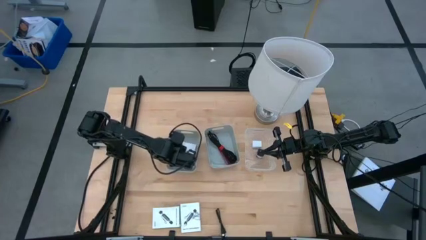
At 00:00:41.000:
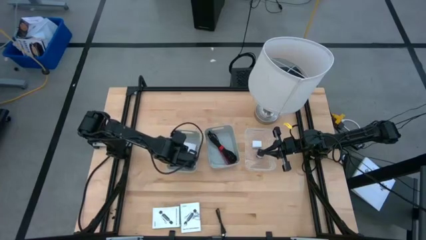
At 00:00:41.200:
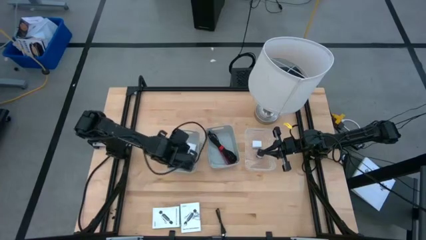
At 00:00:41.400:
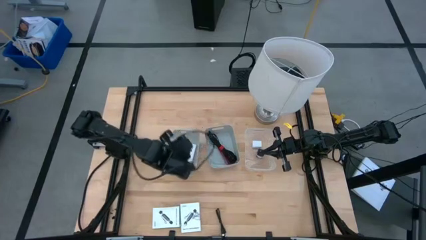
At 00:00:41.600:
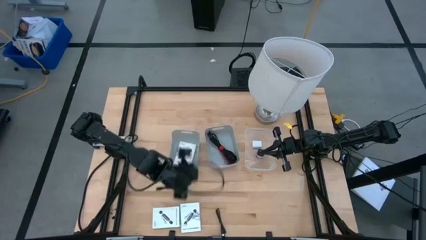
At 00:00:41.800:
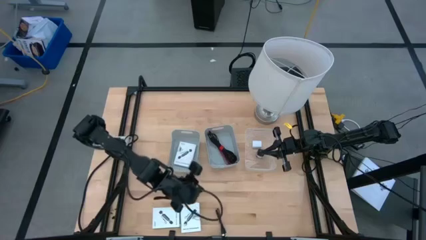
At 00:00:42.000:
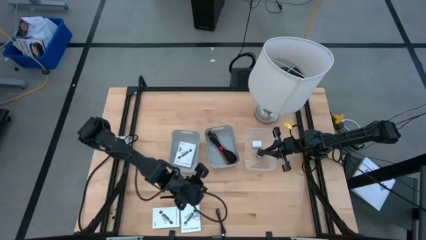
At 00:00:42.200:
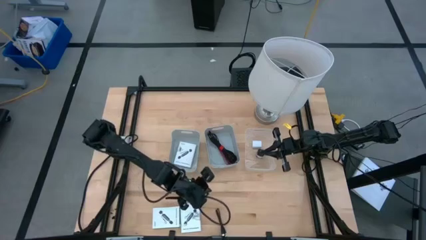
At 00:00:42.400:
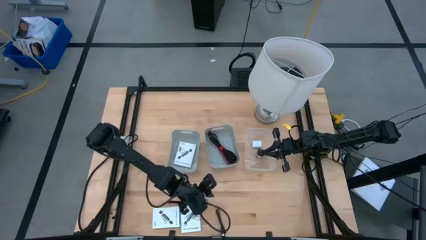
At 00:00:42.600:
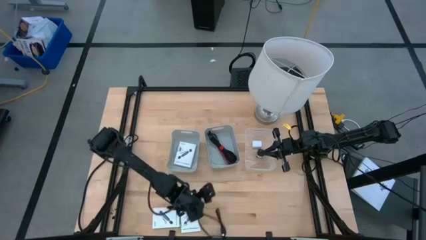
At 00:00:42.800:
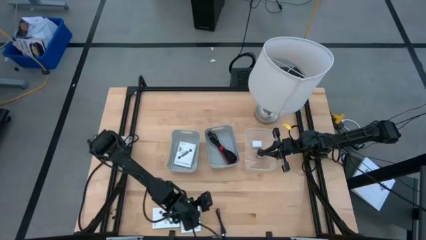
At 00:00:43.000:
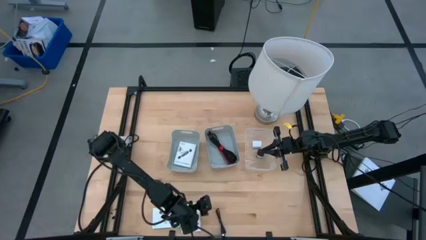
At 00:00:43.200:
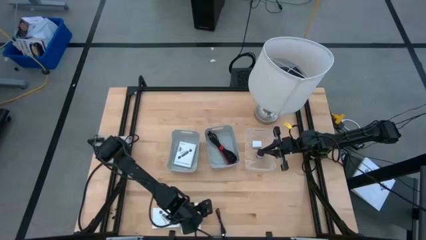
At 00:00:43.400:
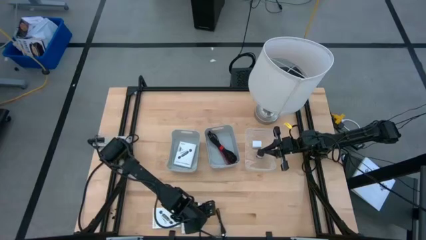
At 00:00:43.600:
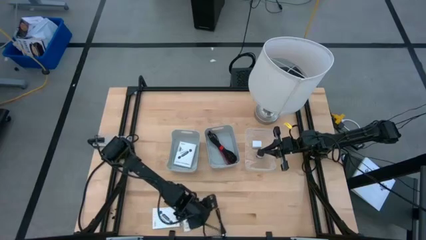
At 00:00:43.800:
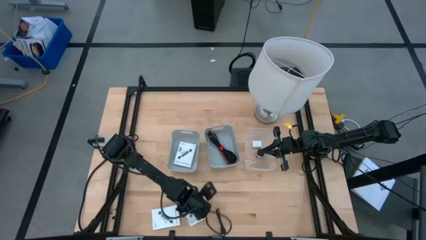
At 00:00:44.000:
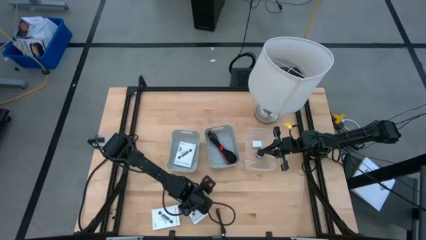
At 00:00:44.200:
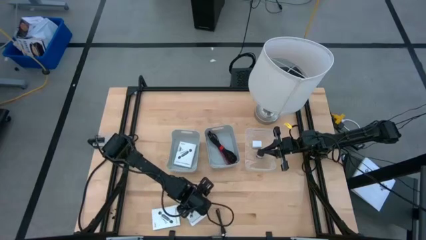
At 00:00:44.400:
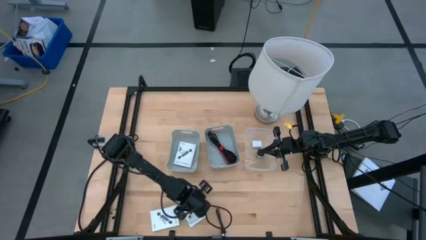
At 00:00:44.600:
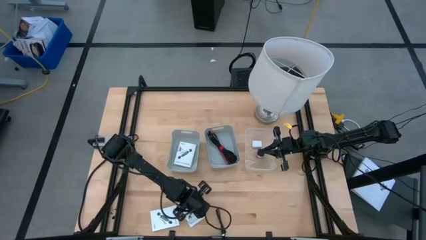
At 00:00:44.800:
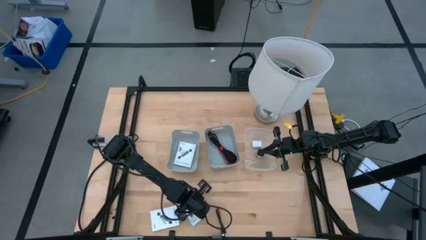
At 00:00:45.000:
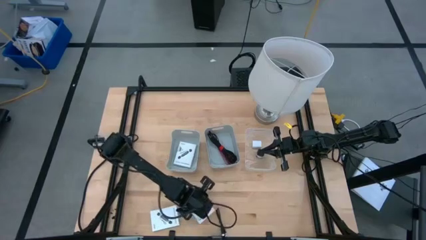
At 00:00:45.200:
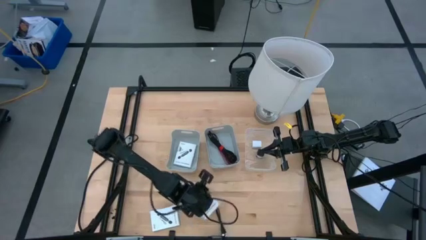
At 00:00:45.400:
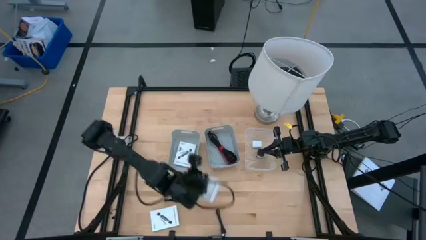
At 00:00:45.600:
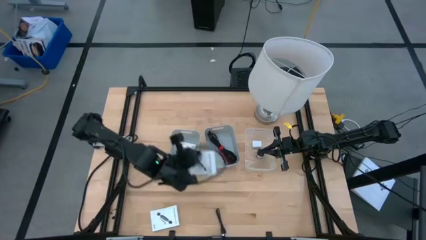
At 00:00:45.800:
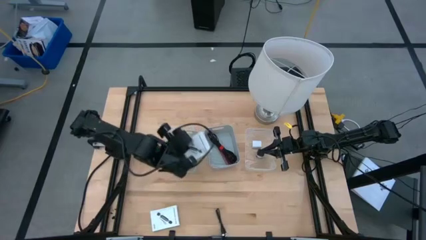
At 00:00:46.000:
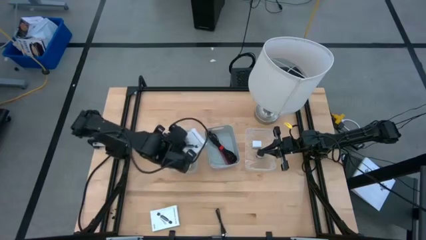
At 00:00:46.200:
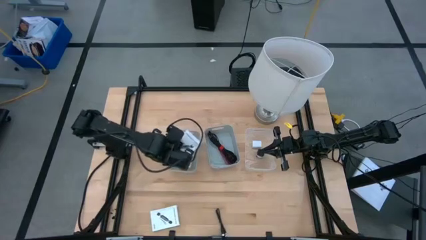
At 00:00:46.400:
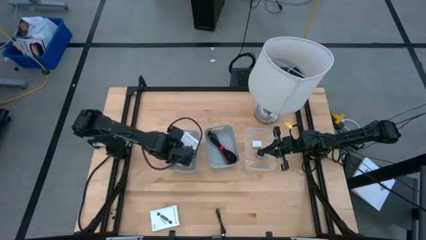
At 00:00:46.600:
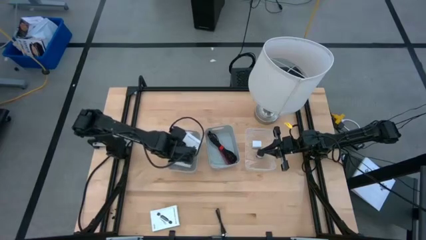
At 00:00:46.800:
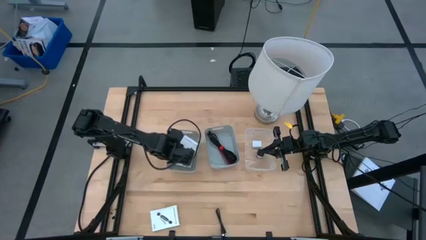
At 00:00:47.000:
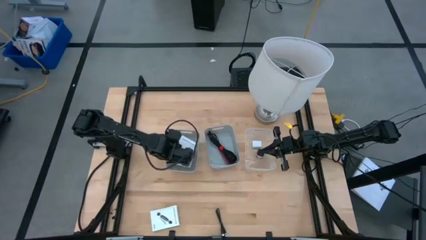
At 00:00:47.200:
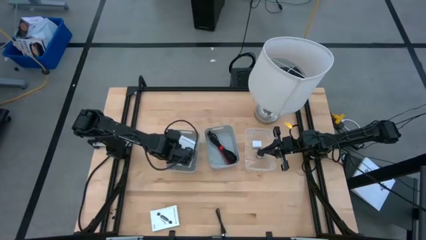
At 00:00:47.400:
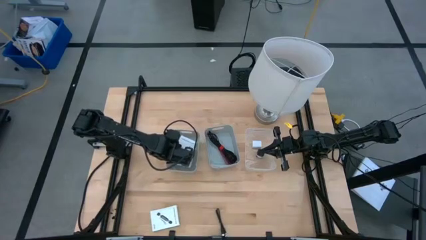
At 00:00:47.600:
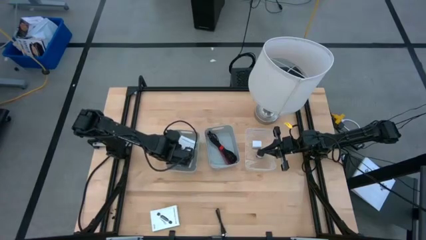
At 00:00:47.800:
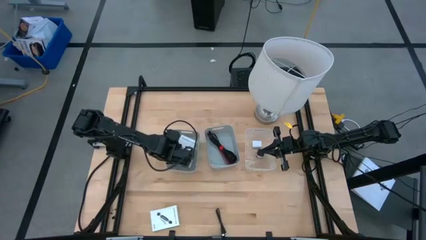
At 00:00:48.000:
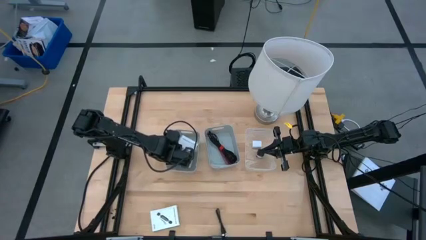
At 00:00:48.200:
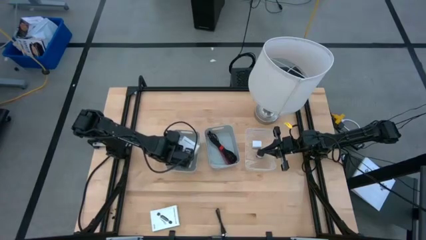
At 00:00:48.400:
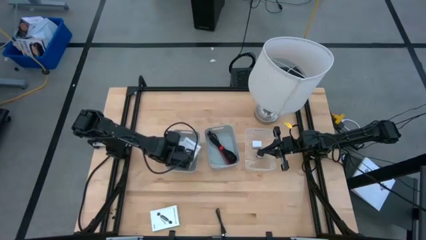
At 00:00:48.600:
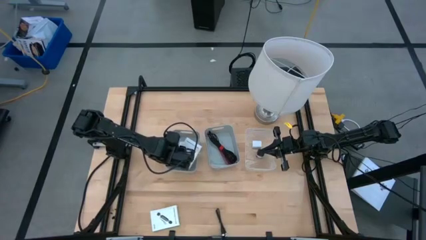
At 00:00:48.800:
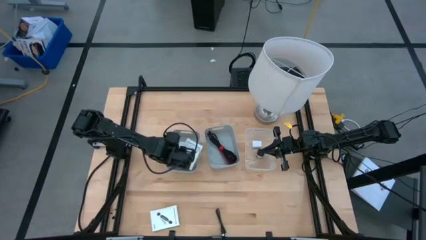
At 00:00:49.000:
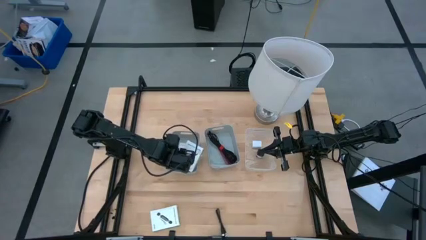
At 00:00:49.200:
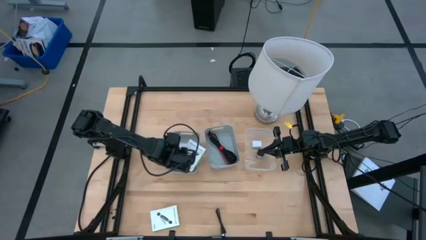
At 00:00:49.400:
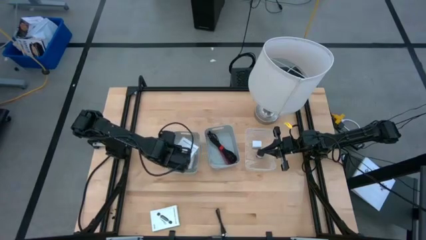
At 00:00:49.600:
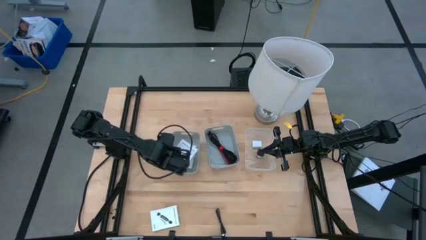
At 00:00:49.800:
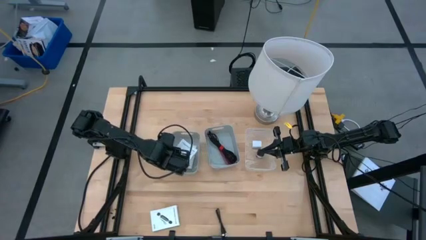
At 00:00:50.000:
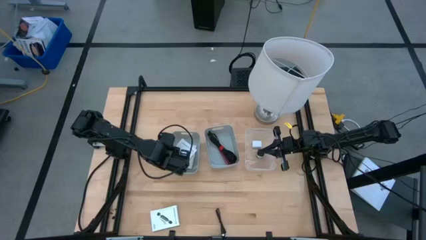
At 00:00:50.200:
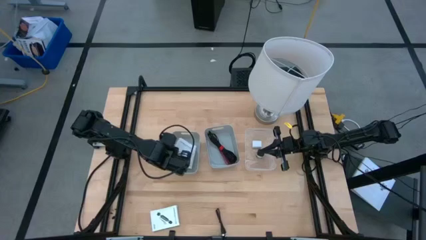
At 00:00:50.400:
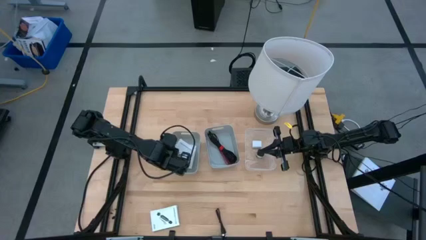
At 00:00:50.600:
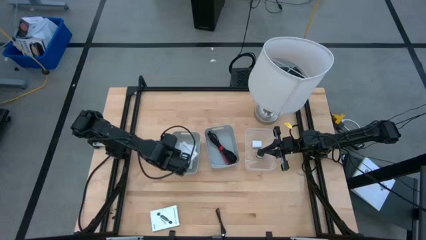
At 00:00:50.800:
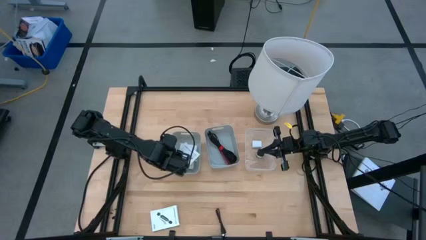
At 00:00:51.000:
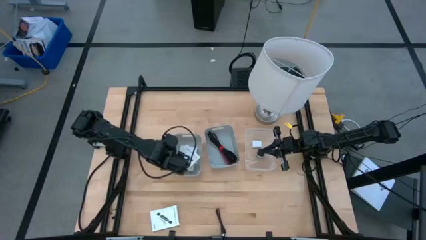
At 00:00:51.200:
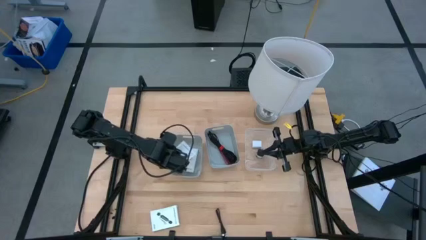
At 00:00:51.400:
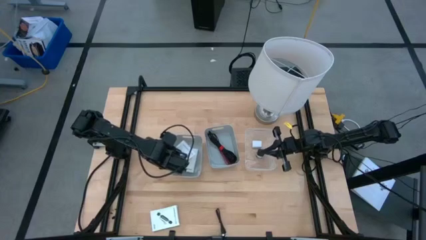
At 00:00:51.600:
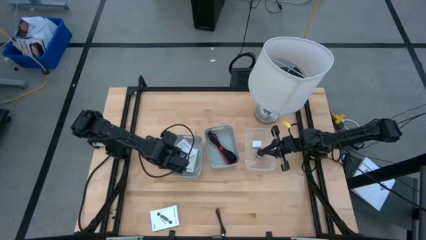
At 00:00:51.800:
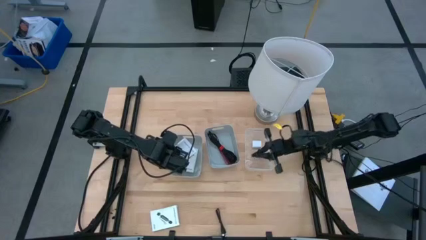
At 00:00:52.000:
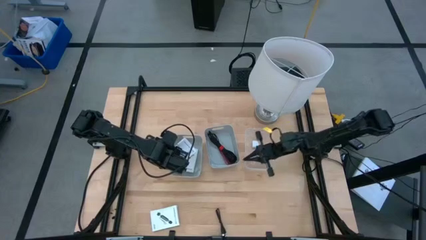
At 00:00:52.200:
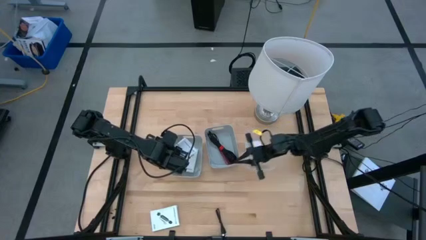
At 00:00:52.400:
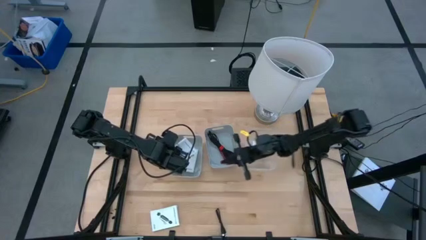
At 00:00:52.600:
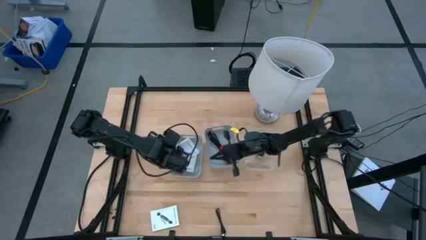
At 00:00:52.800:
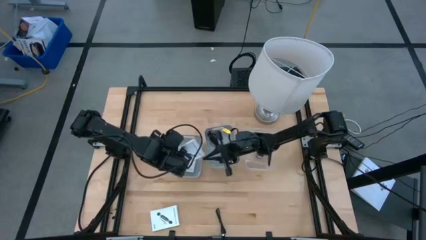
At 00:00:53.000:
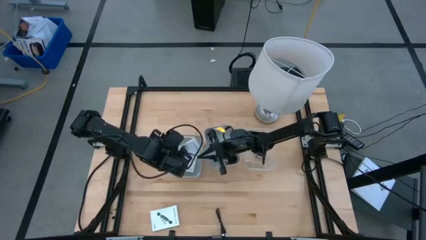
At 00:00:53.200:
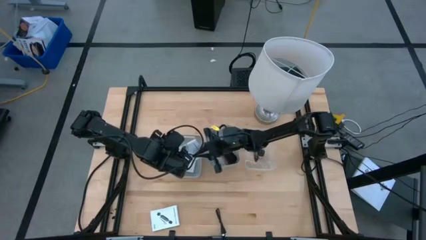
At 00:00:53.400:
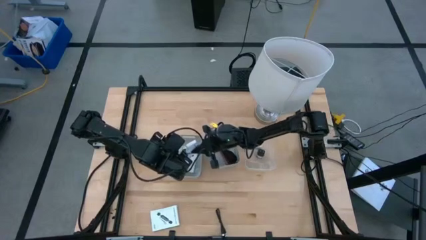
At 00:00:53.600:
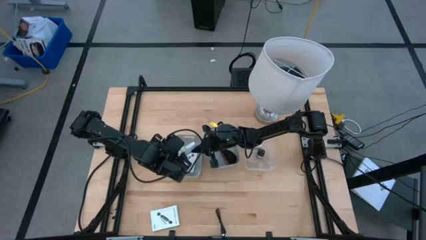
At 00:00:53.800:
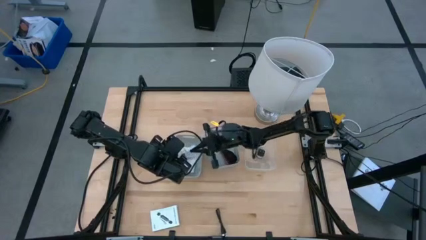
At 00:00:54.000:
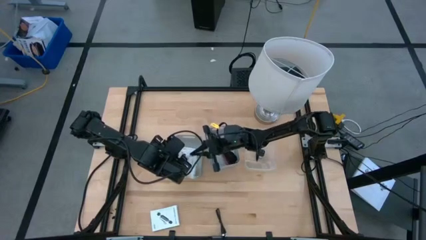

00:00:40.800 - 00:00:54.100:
Task: Pick and place items into bin
Put the right card reader box into the left gray bin

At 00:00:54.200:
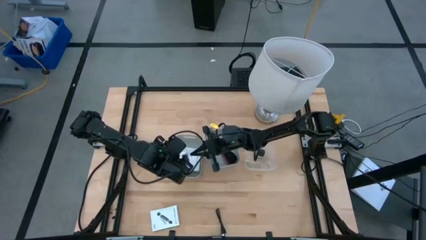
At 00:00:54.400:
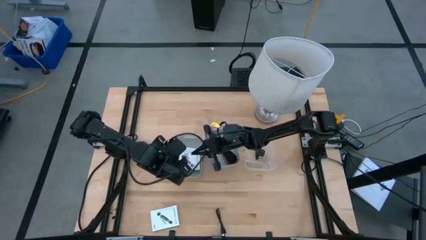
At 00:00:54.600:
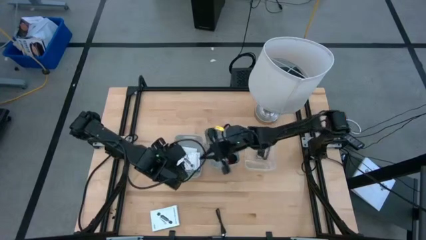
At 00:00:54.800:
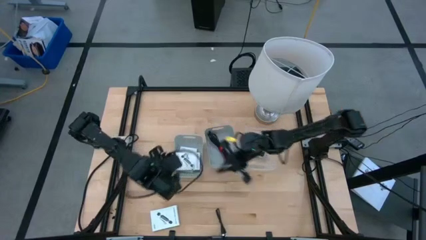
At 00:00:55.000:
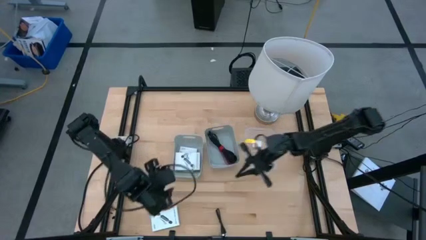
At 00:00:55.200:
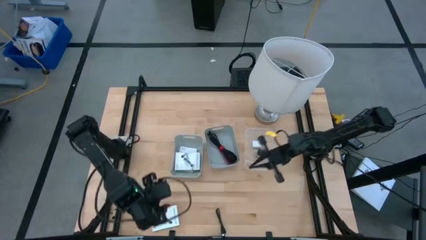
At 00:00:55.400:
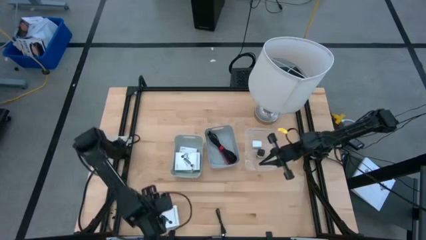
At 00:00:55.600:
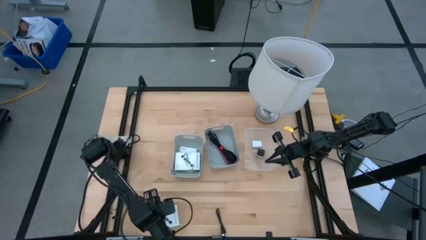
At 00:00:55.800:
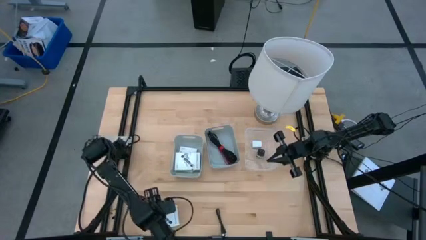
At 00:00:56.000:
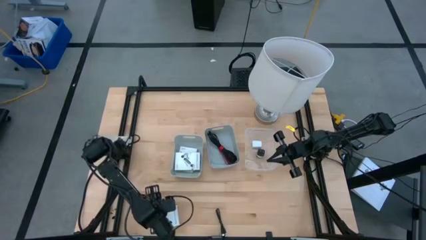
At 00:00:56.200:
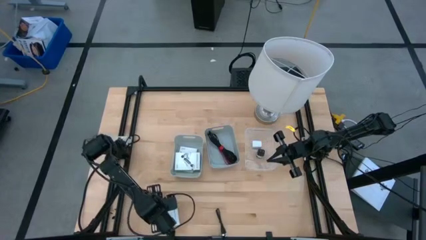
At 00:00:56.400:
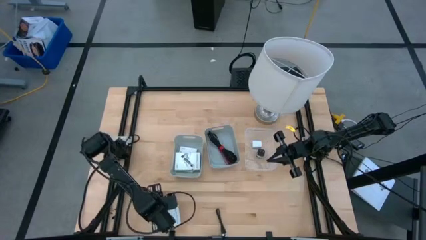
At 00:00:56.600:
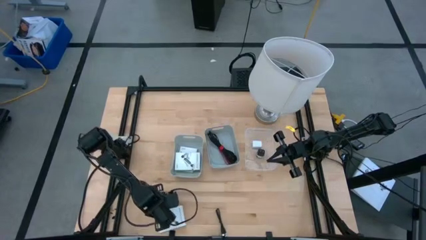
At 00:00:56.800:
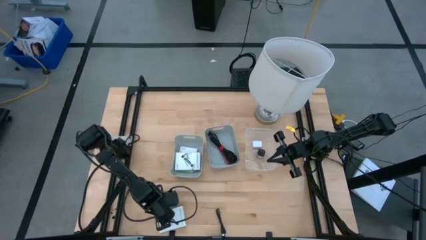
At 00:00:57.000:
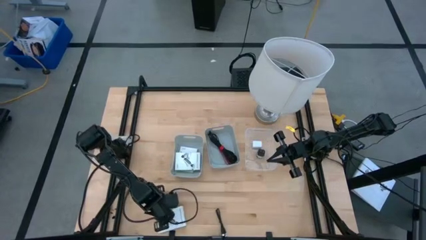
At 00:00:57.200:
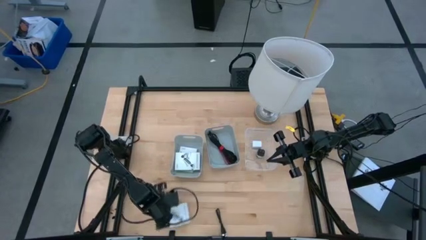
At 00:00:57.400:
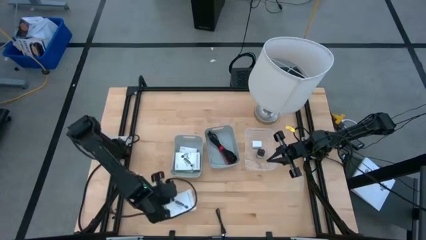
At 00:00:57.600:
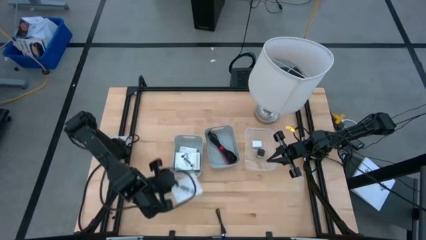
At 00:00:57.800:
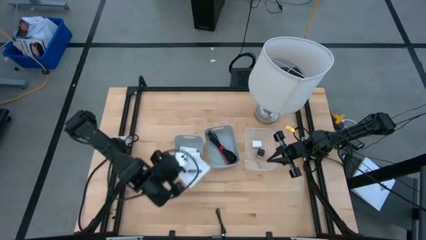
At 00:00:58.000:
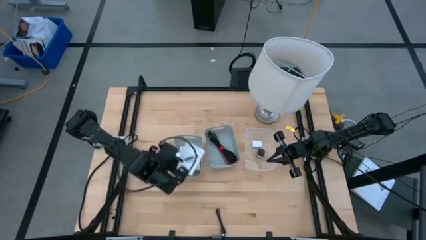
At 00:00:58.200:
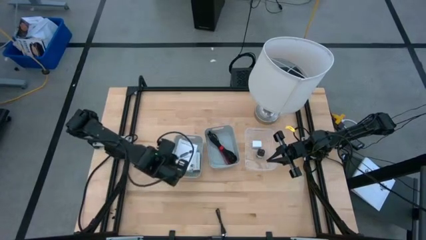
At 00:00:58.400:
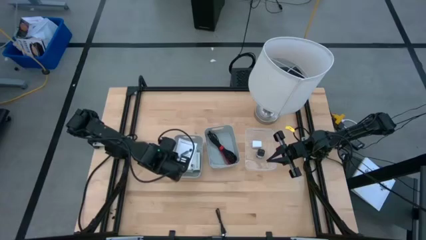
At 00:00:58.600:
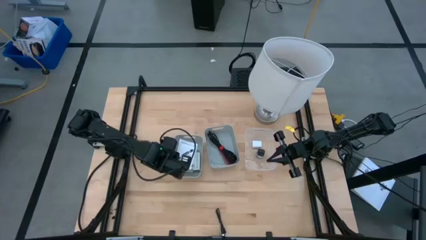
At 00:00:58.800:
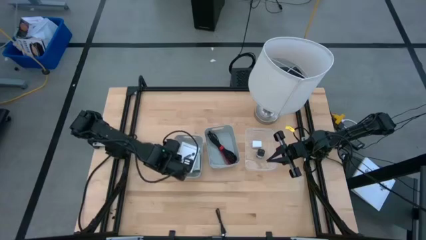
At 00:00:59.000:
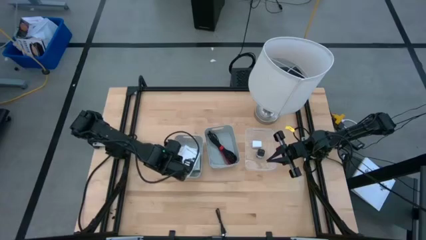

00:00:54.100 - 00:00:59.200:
Put the card reader box into the left gray bin
